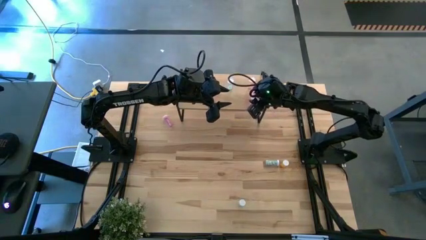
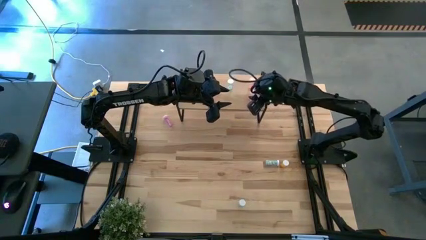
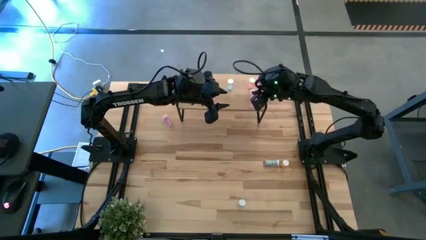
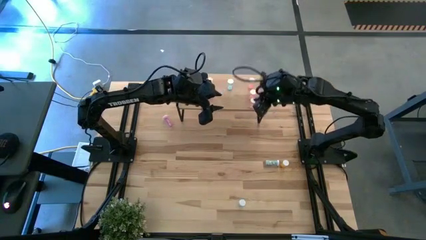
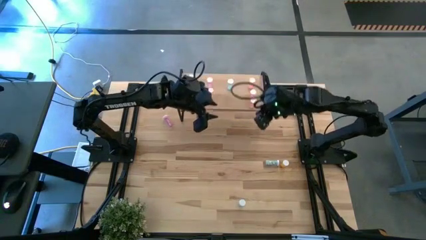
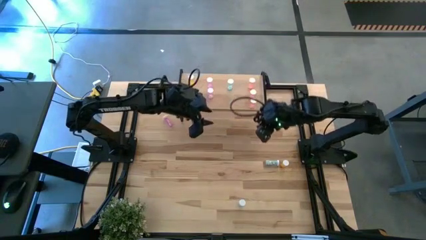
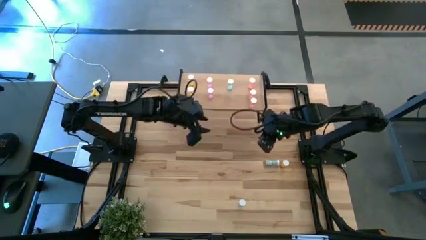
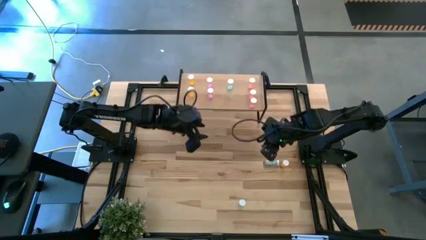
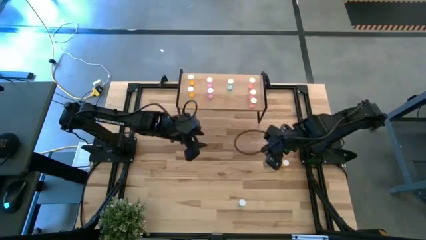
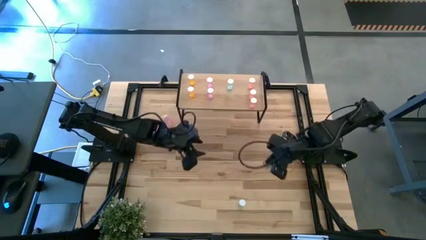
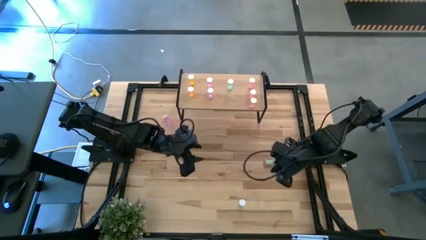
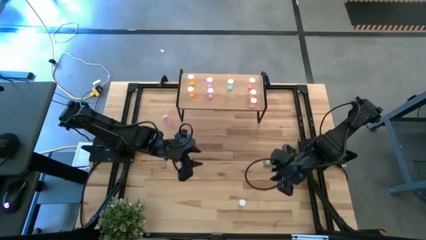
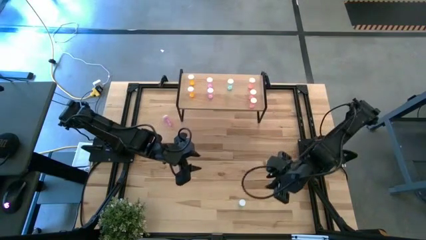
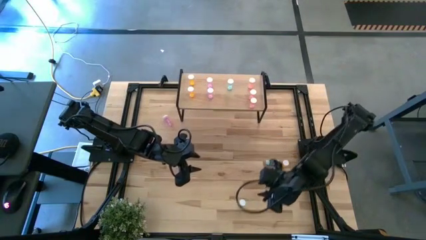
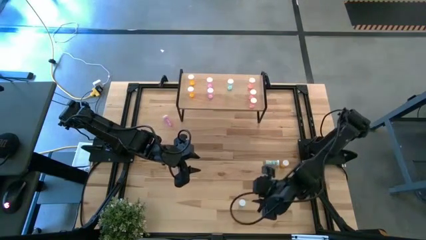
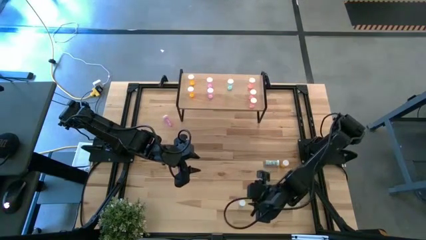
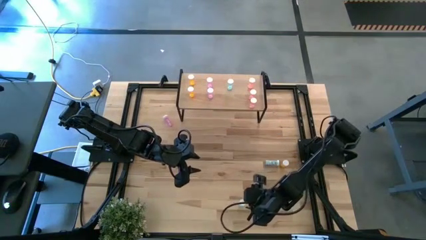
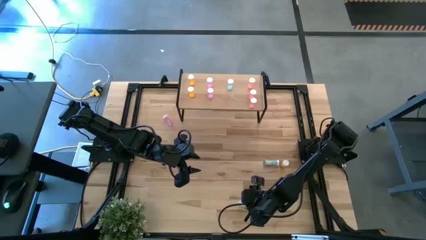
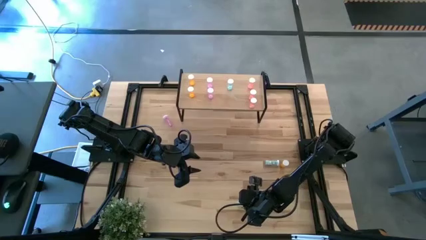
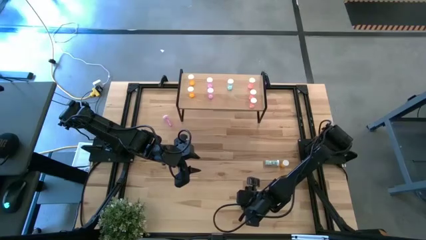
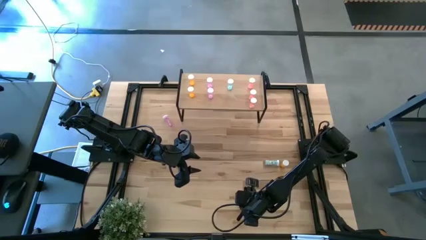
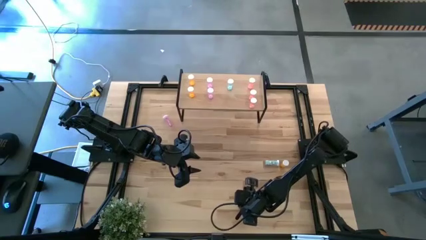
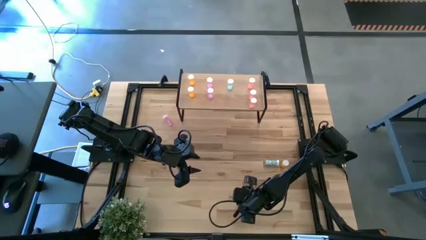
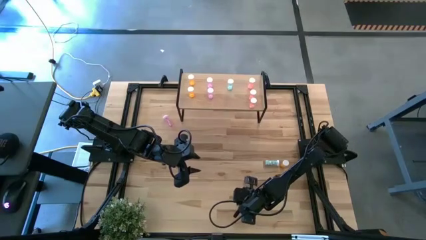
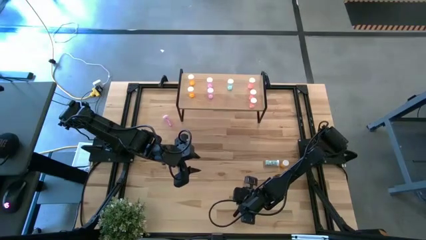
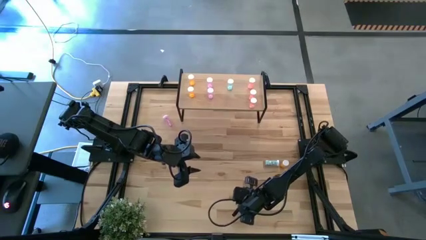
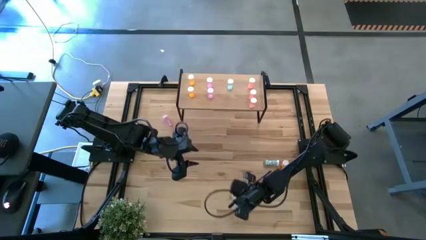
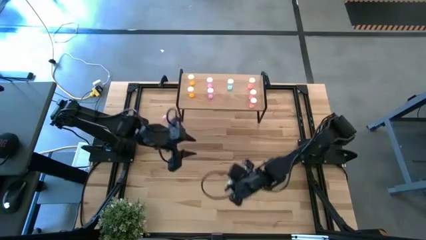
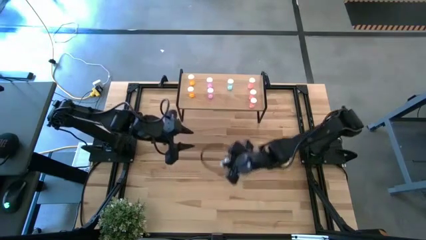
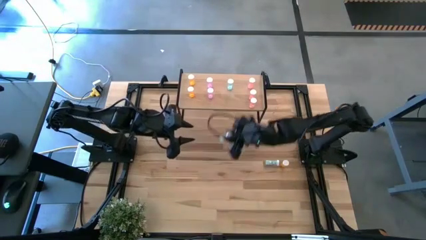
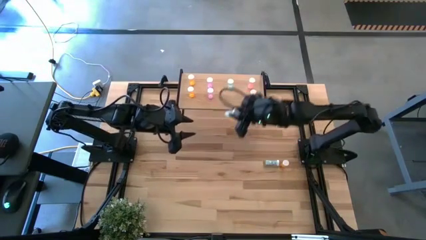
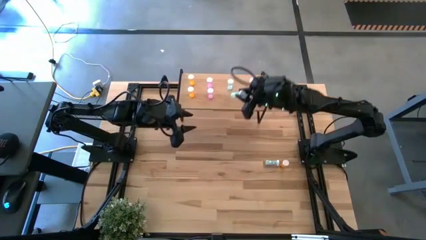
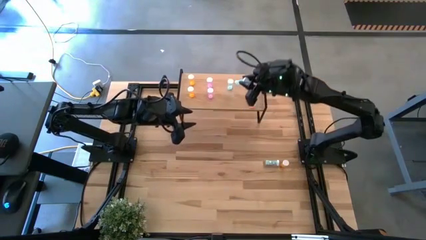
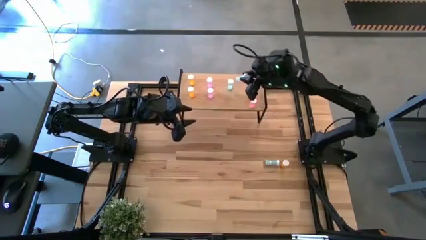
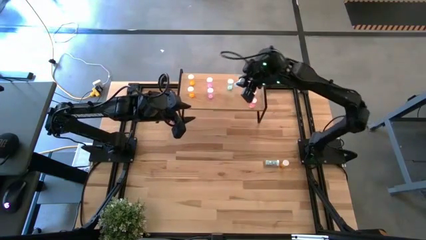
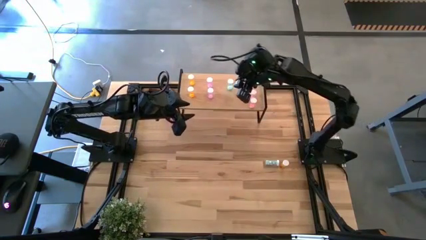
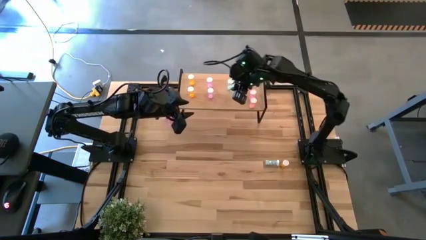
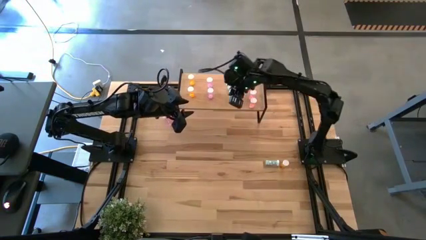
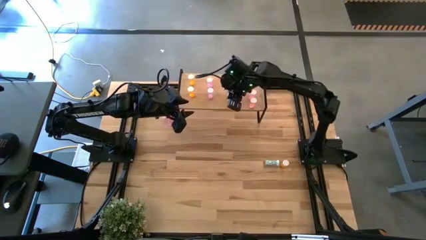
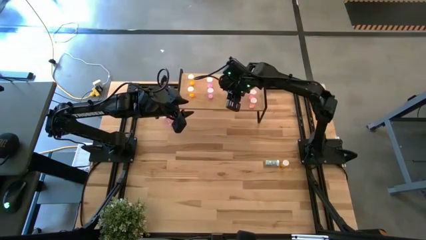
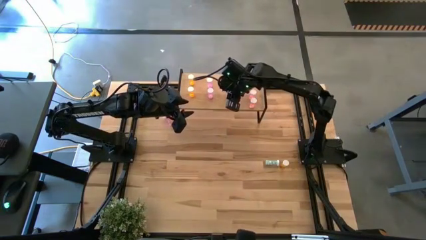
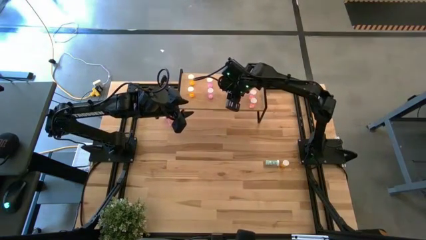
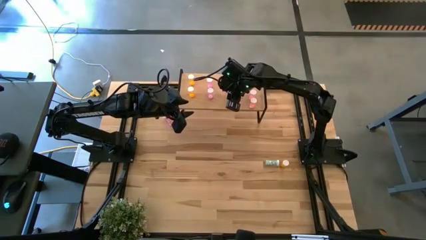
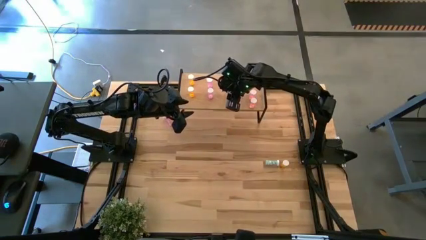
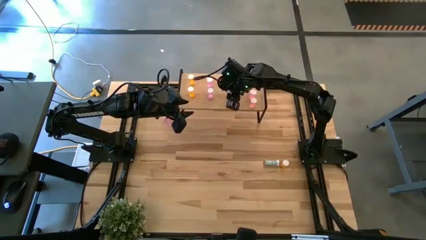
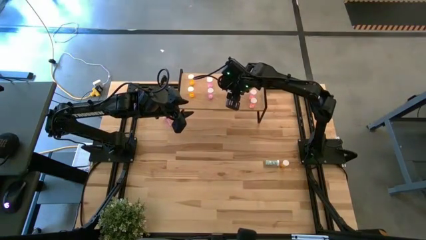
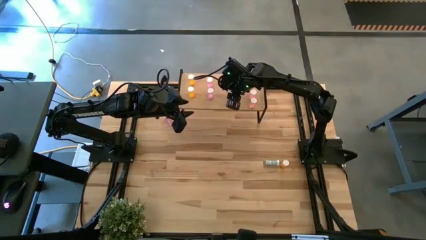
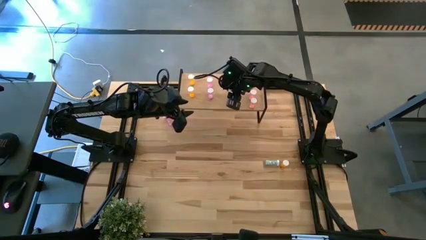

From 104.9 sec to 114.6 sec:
Task: Pick and place medicine bottles onto shelf by color
Put the bottom blue medicine bottle on the shelf aligned with the other blue medicine bottle

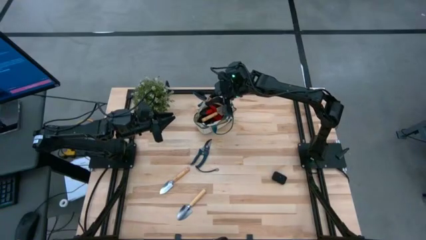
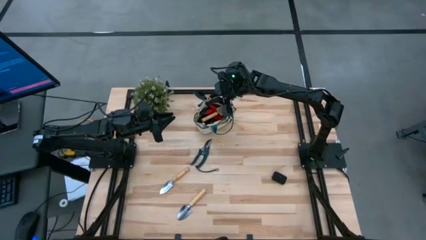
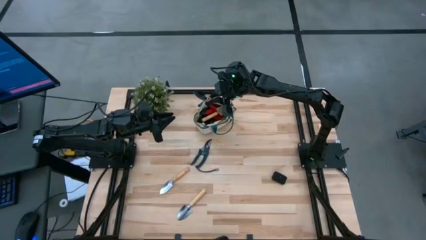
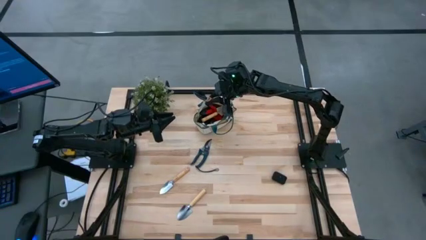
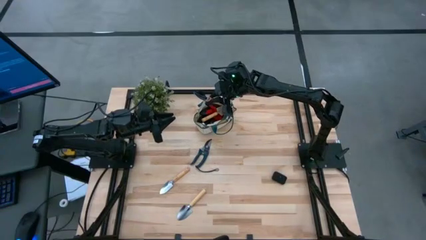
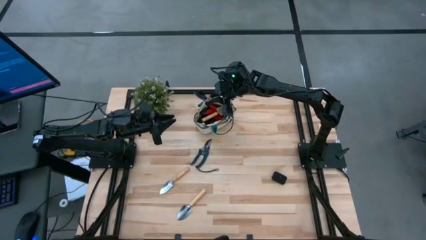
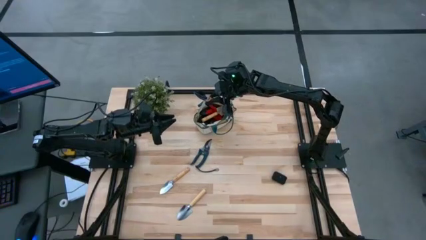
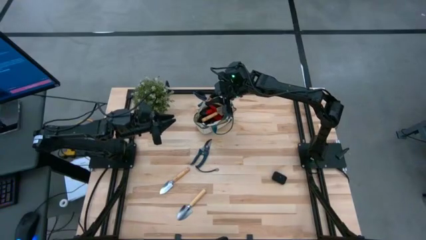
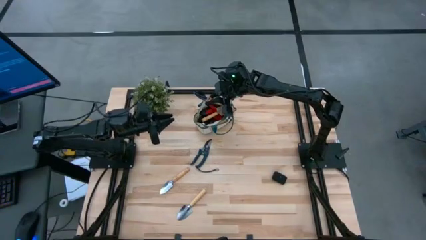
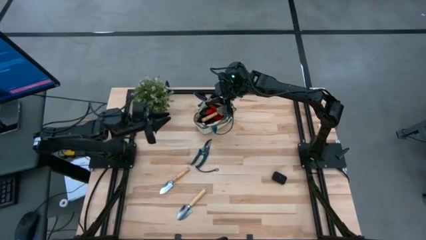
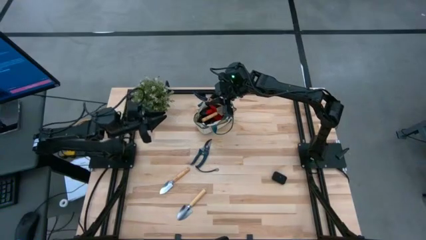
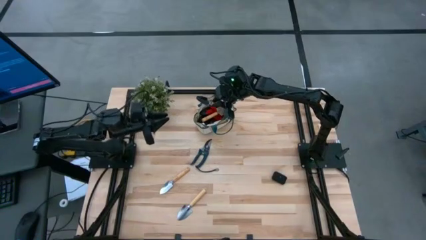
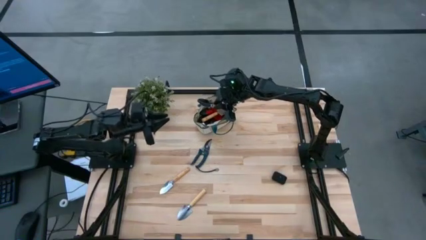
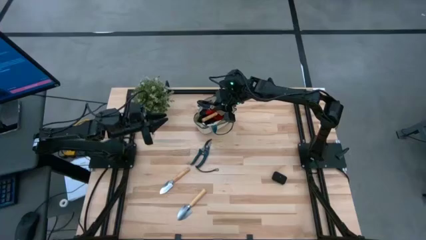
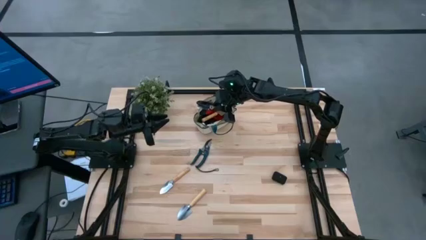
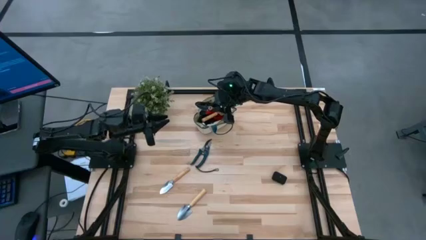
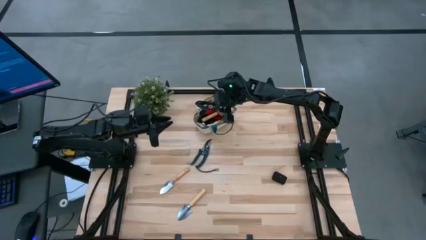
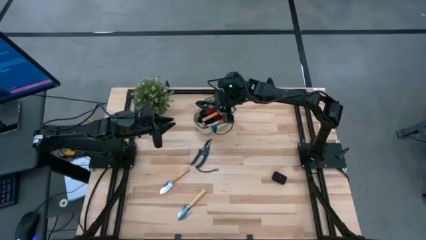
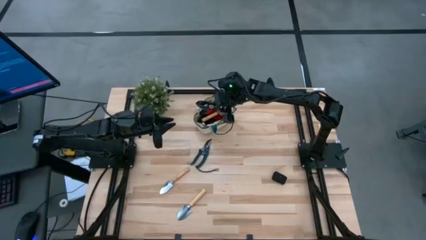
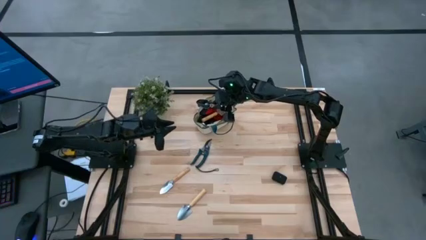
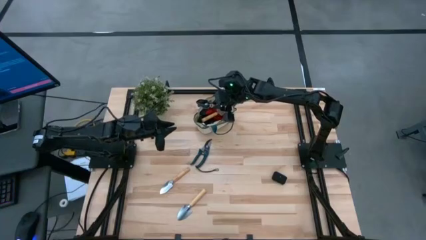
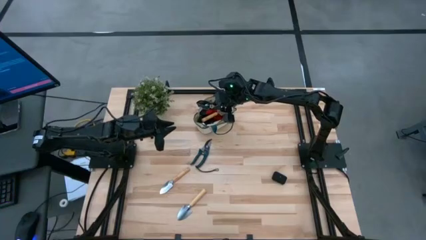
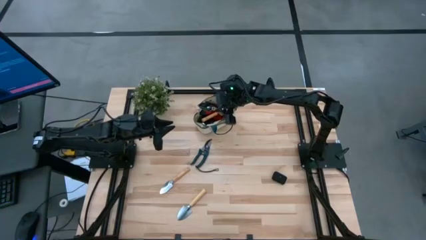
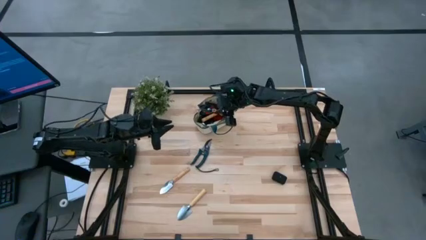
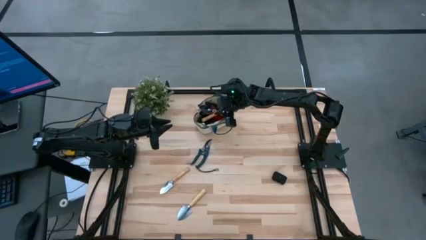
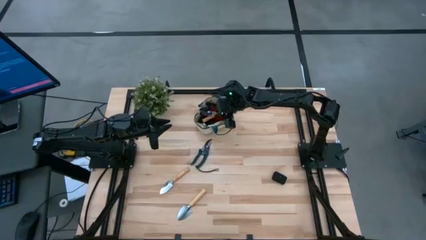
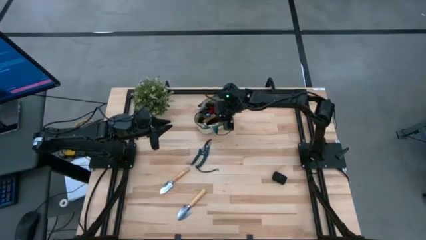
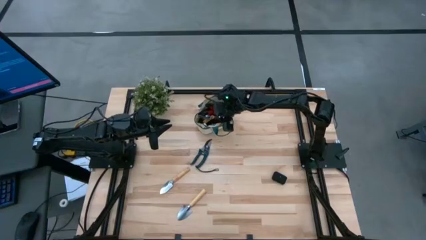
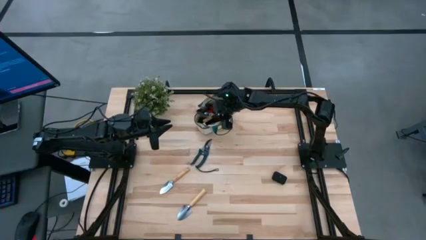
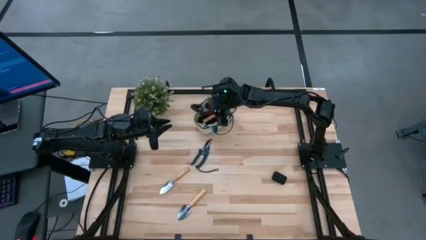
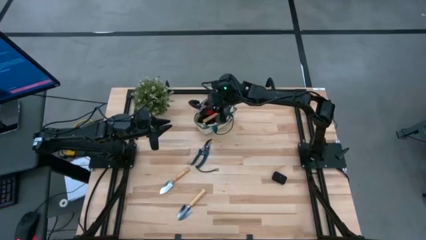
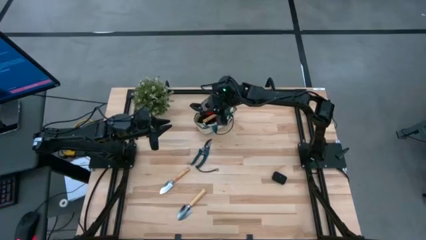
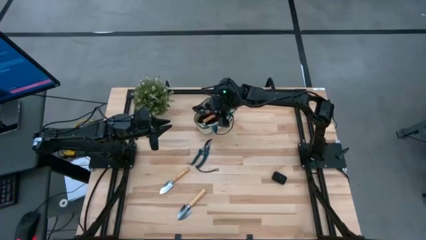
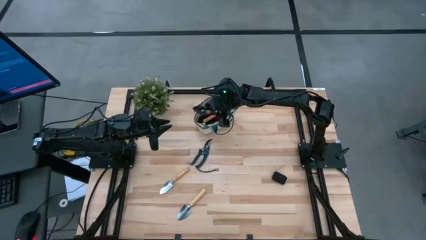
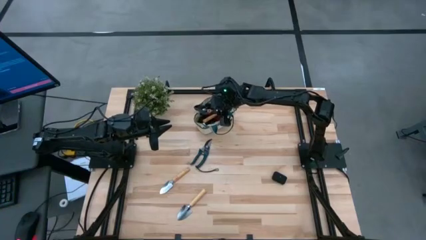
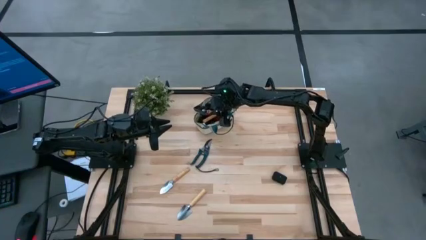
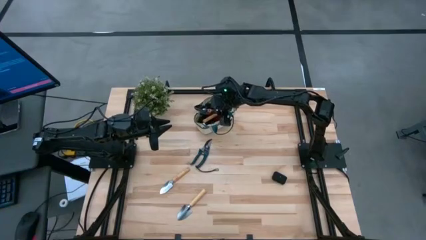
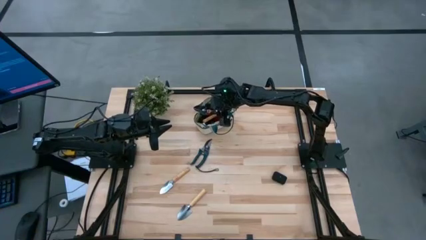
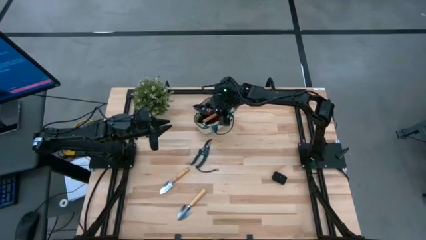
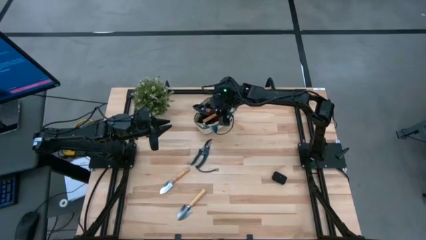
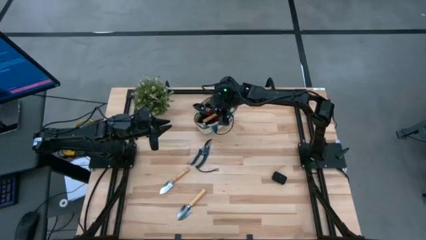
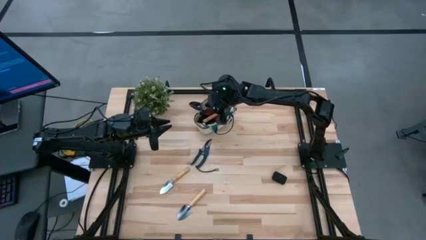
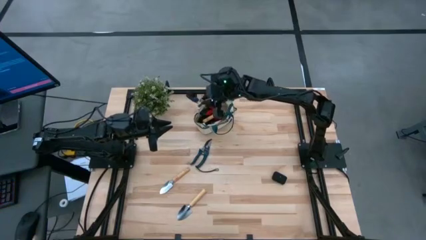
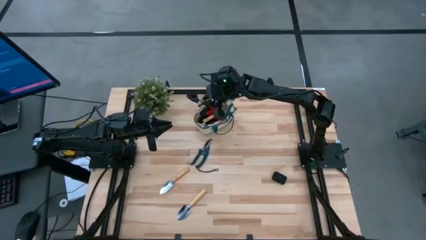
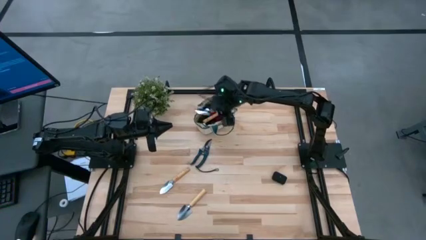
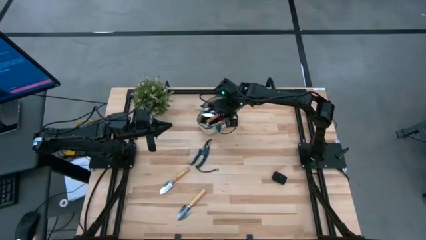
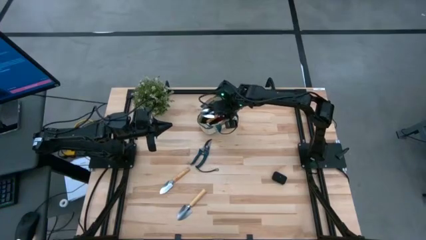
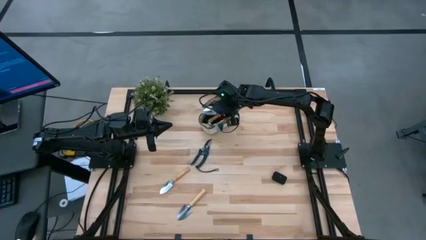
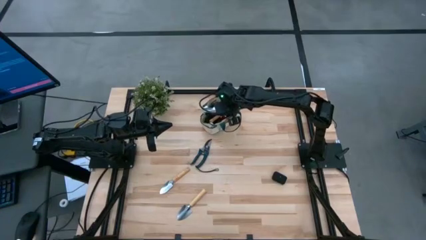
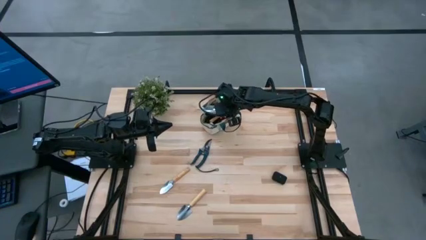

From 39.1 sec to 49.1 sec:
Task: Pick & Place Garden tools in Gardening bag
Put the brown trowel into the light brown gardening bag
